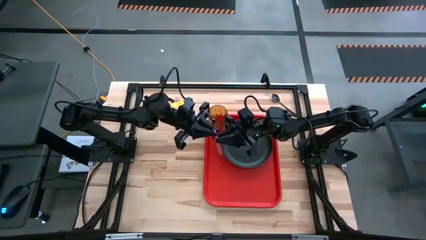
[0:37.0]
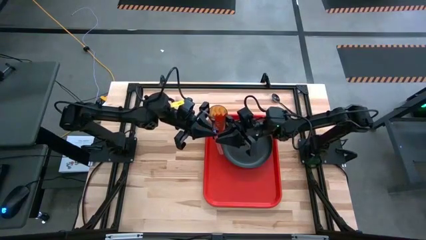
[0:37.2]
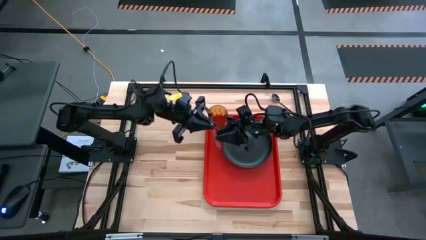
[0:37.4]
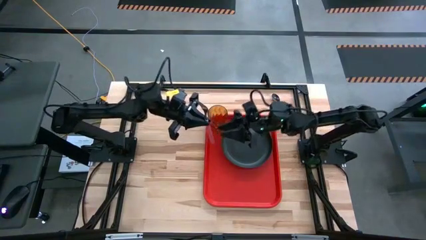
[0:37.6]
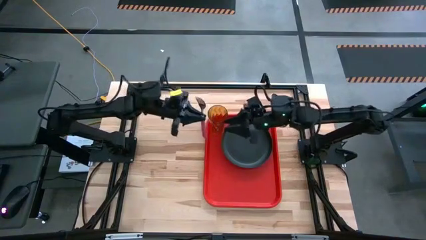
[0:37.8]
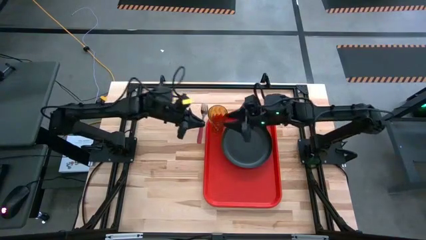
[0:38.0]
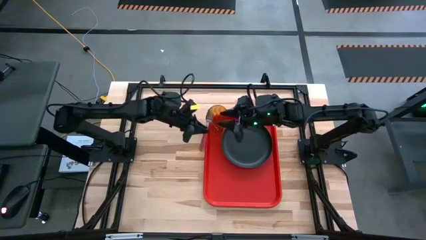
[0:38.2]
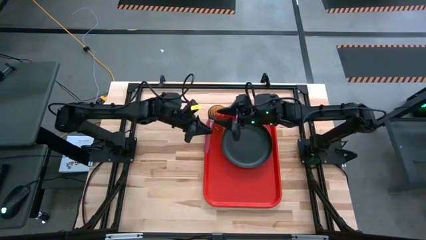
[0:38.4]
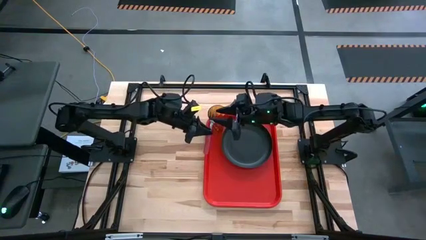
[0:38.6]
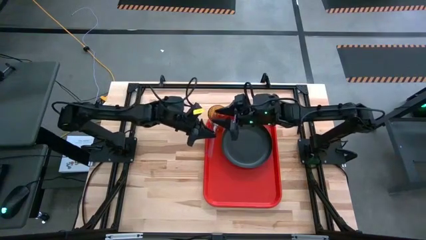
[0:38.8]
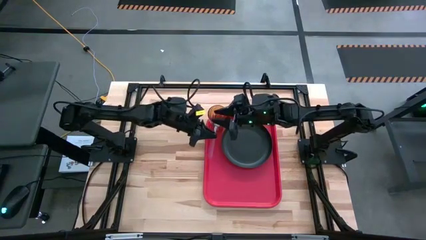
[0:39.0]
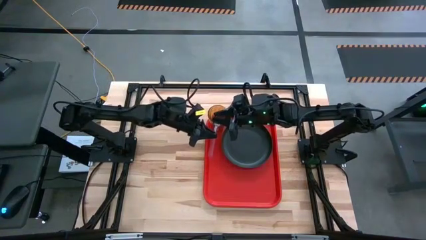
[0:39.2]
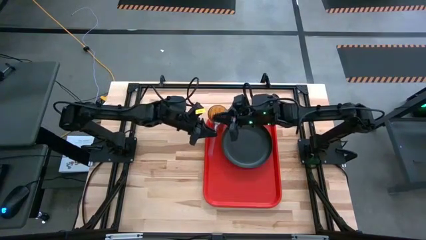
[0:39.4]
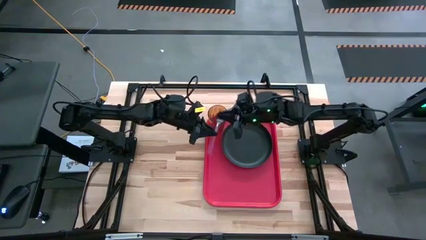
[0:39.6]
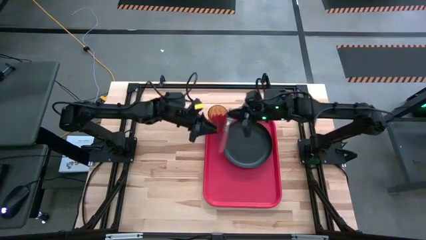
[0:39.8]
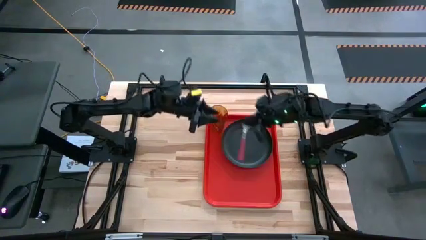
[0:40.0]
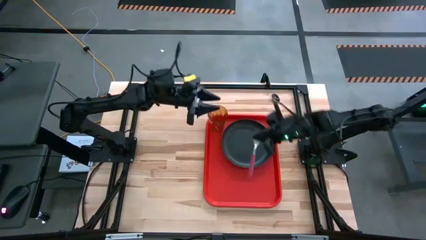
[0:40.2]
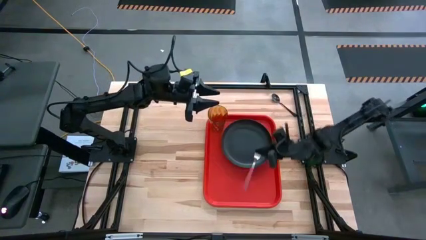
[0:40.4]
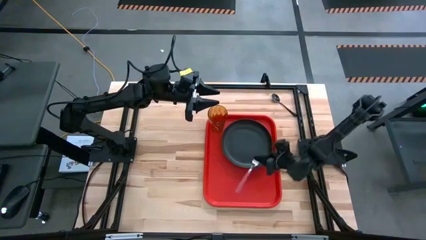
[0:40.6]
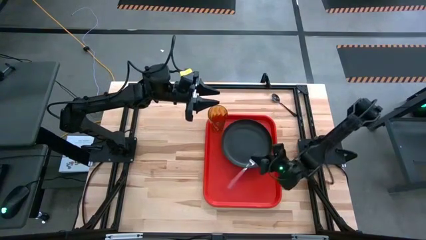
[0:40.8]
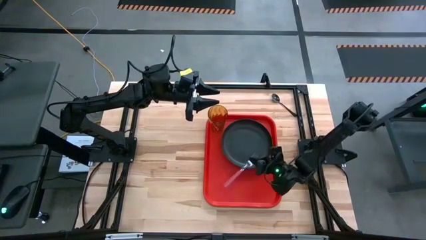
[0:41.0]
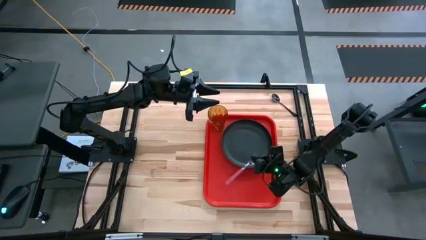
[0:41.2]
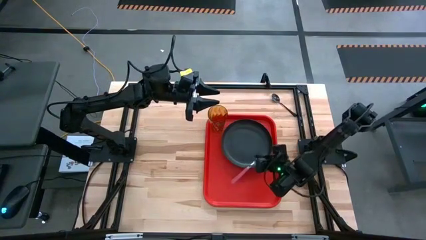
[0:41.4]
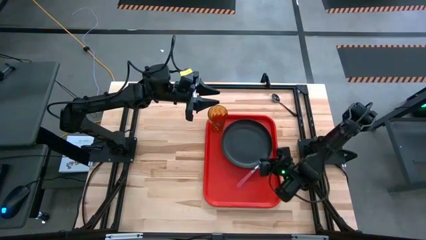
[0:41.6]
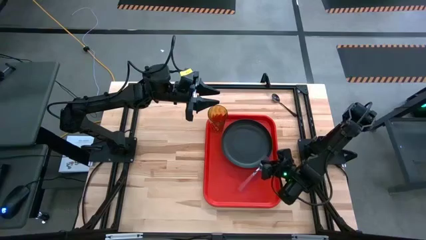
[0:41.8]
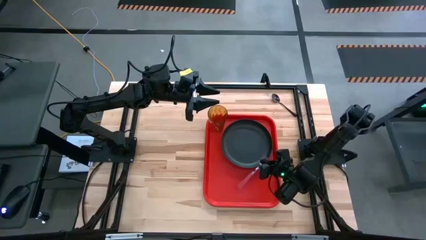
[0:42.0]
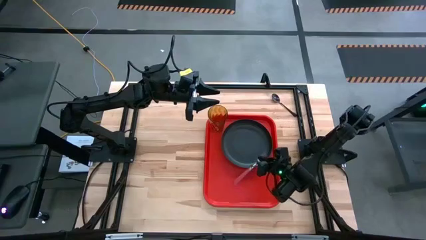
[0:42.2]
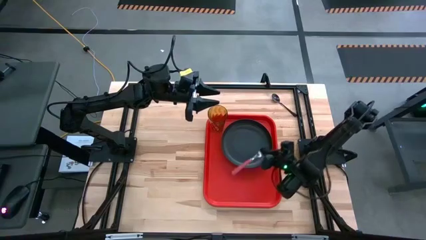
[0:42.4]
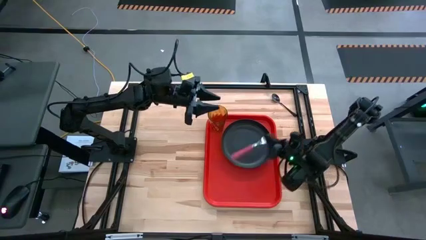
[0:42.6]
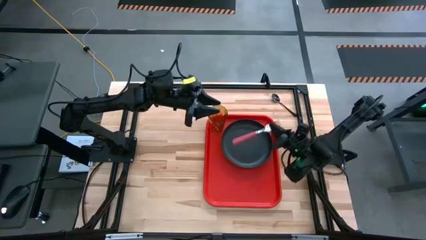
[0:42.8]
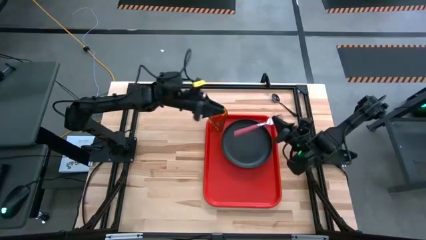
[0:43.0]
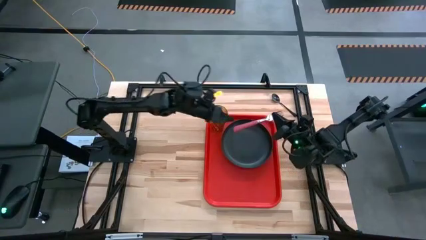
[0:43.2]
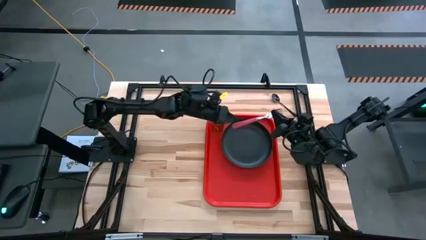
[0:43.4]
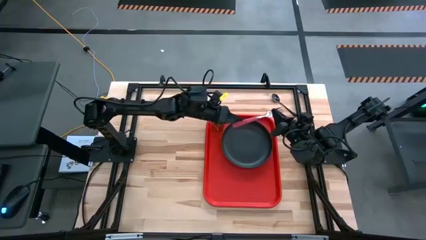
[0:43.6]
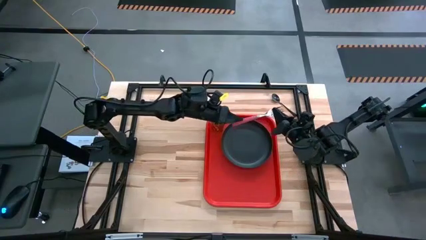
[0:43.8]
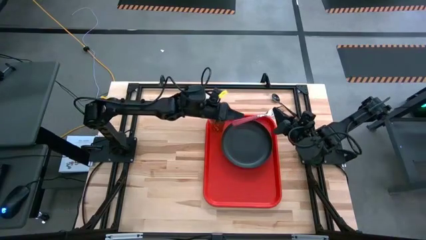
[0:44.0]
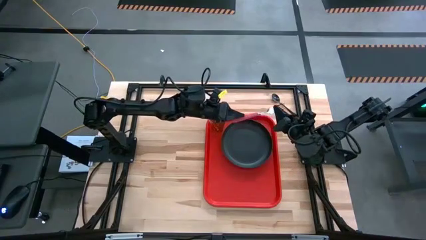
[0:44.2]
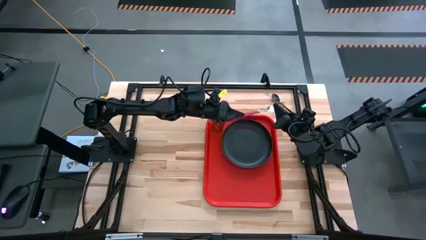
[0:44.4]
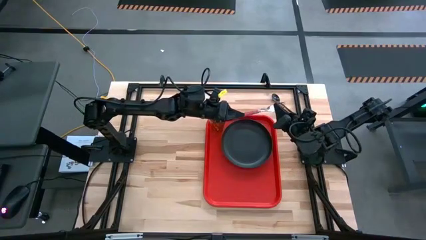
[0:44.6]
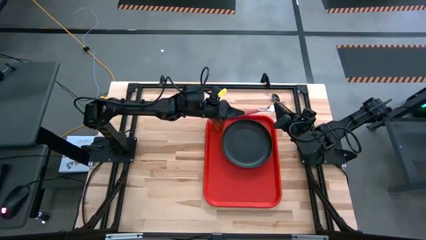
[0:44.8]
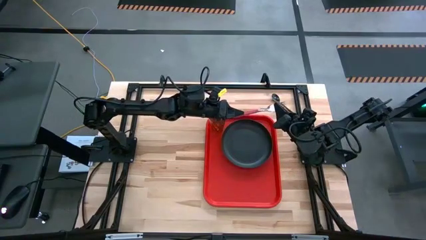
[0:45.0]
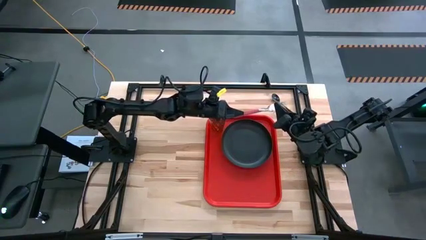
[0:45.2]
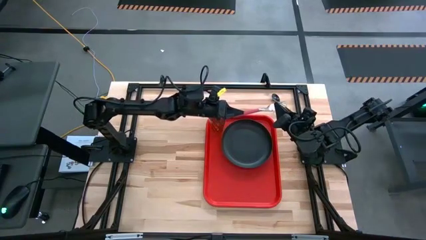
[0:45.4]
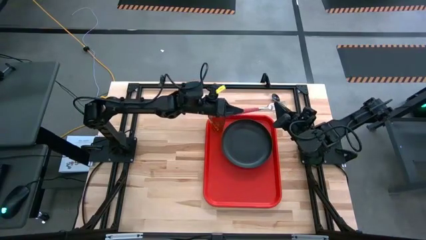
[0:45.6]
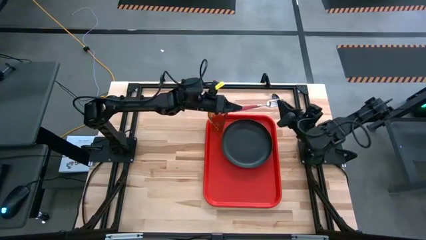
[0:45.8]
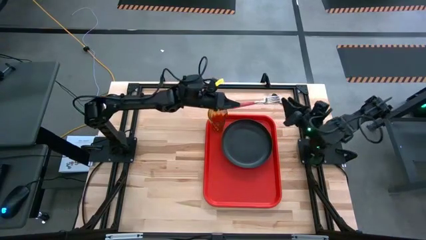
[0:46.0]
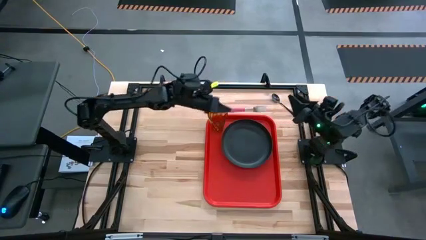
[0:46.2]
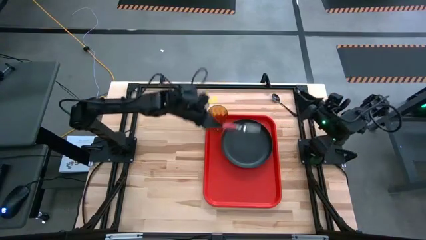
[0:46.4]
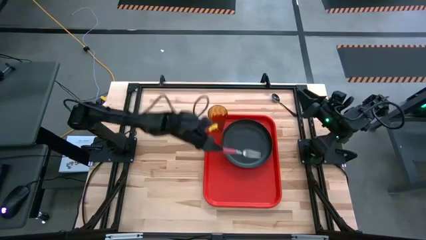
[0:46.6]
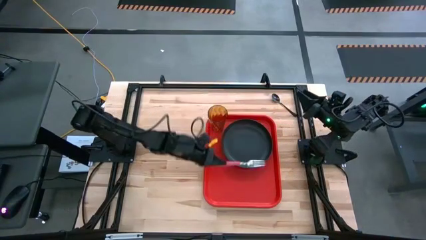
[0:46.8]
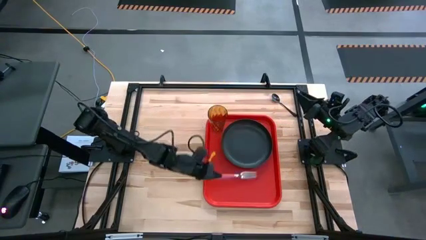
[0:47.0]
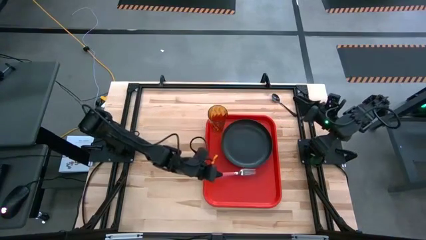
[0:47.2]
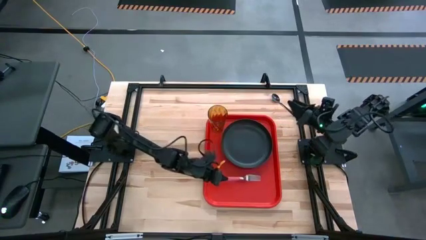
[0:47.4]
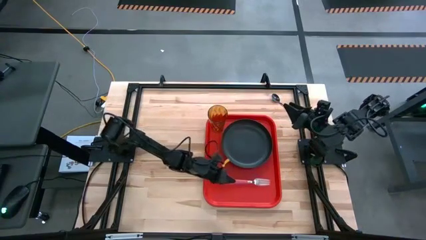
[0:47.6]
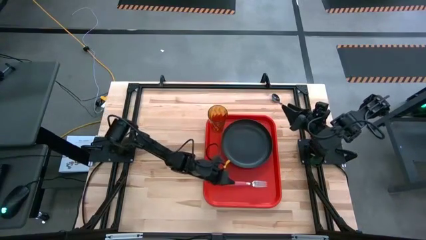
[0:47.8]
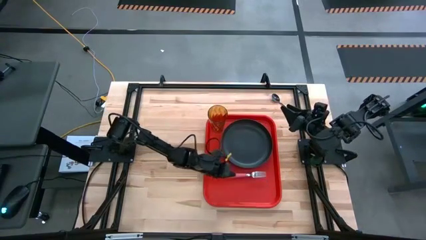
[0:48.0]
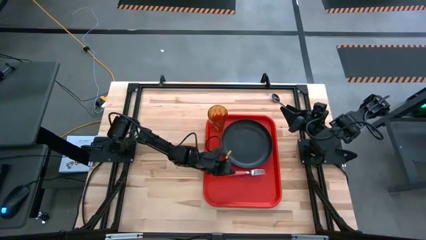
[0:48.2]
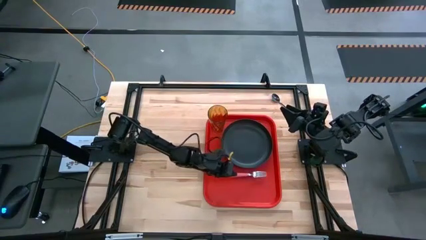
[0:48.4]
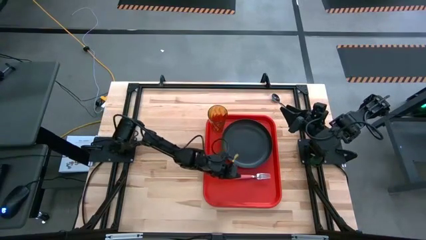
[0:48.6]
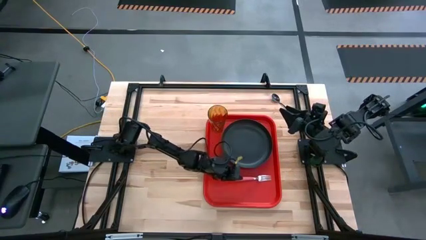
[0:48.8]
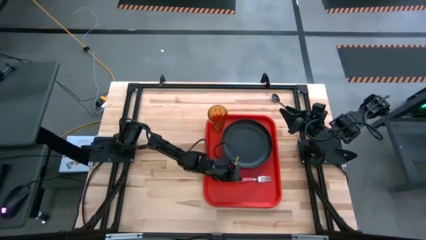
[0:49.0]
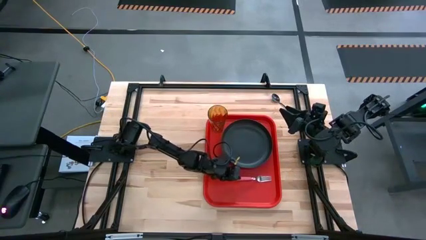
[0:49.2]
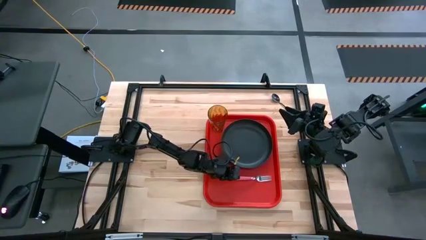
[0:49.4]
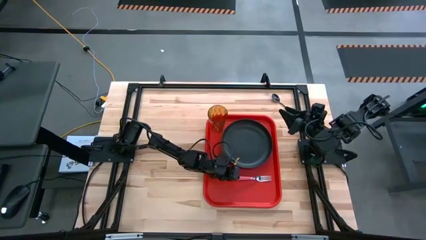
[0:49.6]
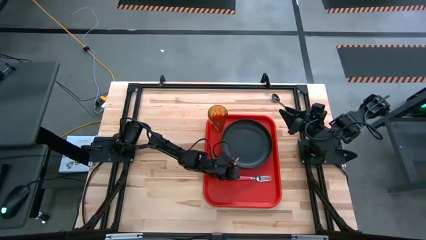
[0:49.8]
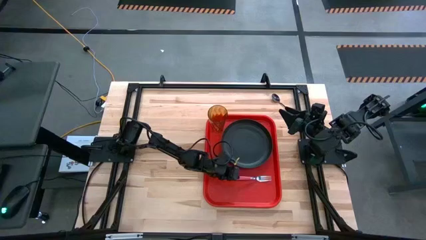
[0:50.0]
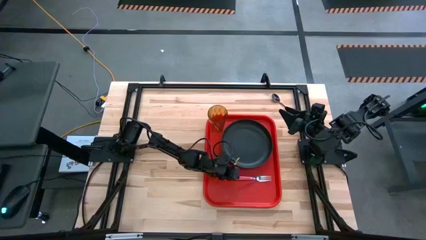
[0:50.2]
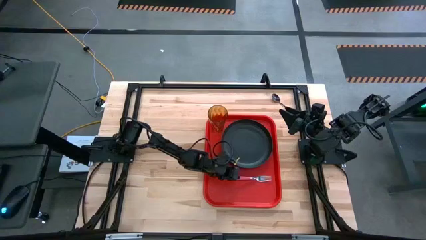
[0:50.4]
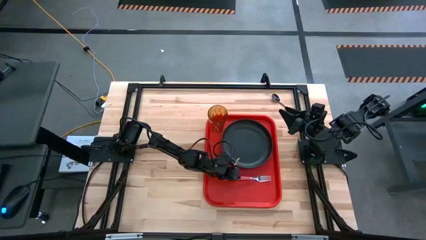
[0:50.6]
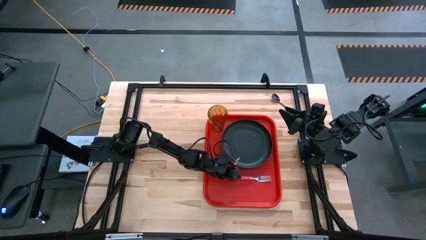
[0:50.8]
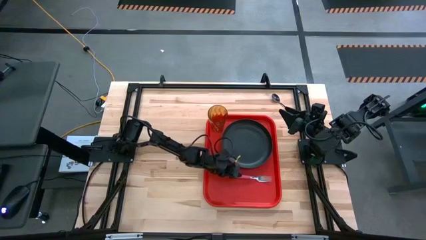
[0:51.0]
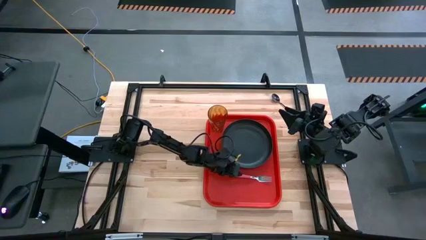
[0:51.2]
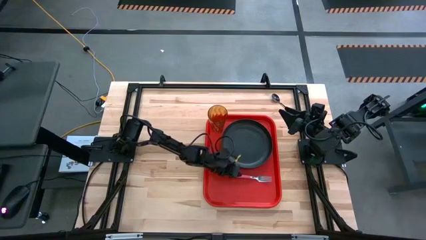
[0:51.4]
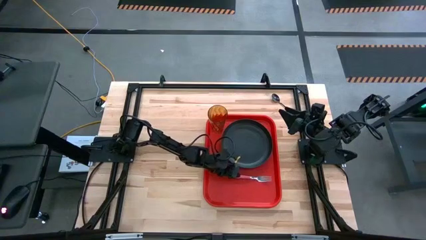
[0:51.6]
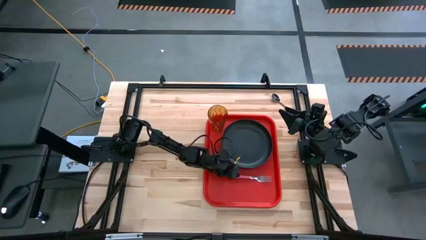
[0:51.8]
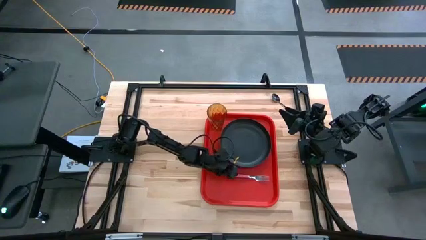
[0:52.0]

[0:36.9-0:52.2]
Task: Pick and place plate/cup/fork/spoon on tray
Put the pink fork on the red tray to the bottom of the black plate

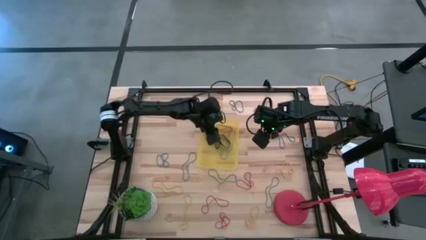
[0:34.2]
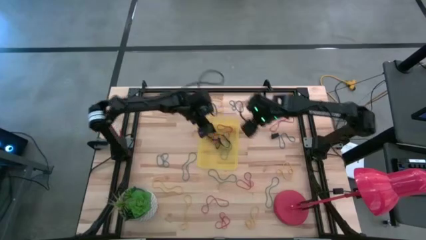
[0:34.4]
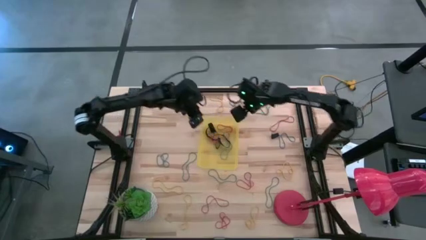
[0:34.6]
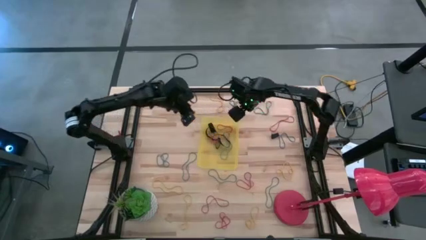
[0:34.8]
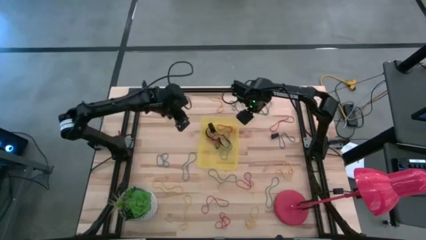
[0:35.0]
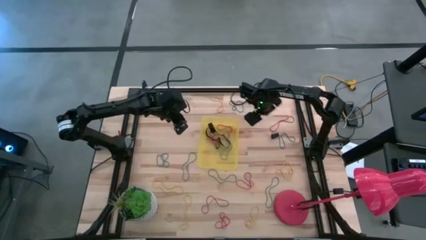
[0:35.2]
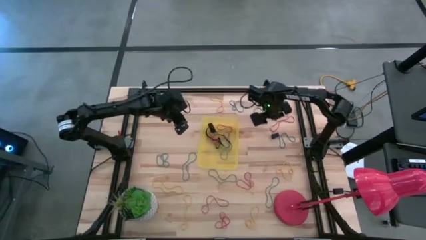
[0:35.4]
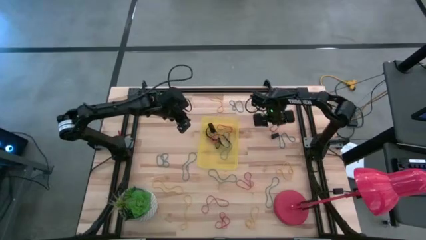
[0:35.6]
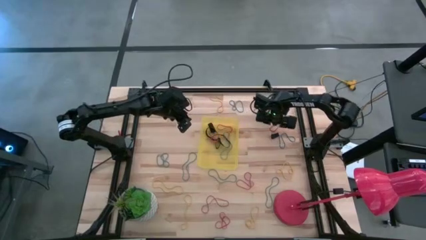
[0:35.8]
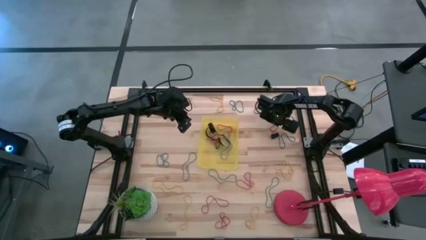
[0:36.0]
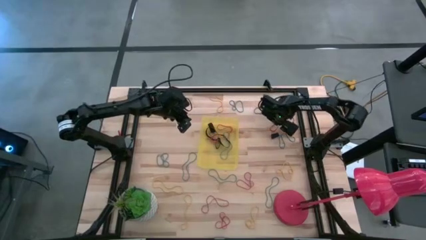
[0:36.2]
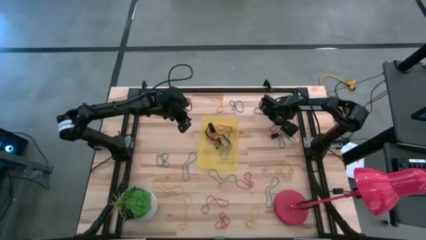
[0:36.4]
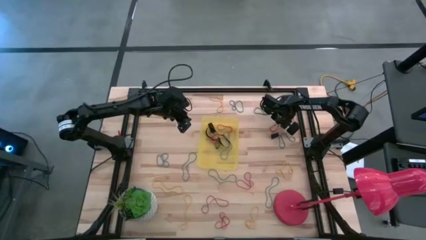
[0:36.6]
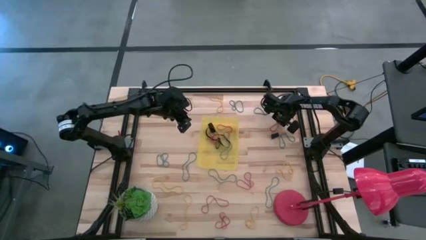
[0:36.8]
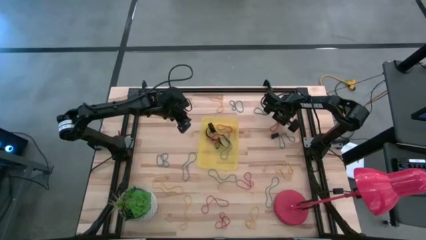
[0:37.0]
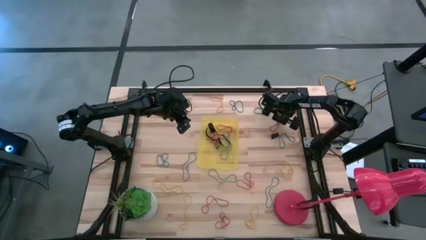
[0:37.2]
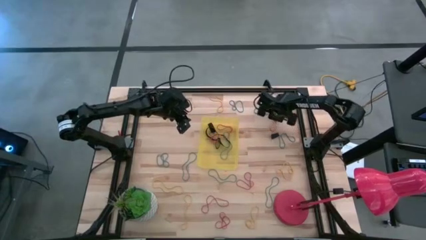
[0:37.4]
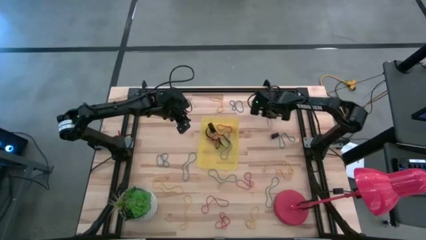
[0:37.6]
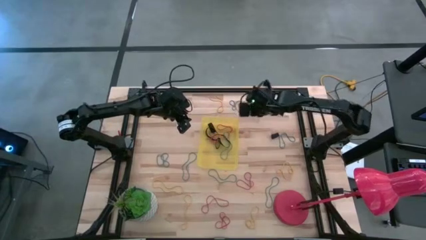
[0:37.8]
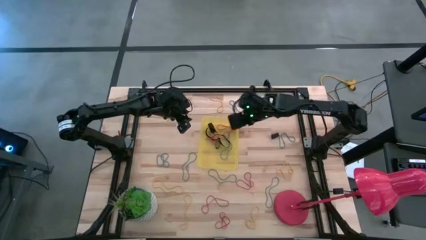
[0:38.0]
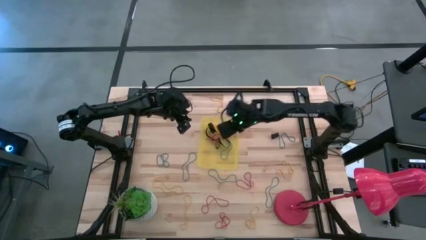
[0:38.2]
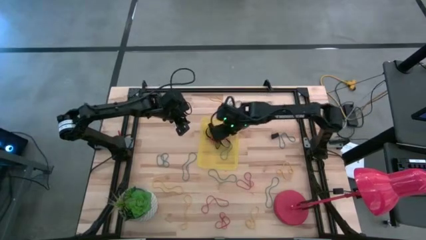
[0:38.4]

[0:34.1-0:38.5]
Task: Pick and place rubber bands into bin
Put the red rubber band into the yellow bin
